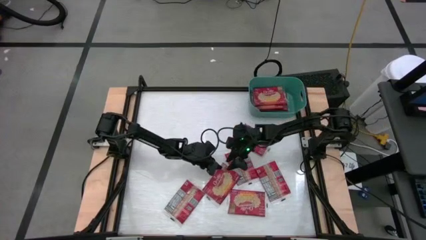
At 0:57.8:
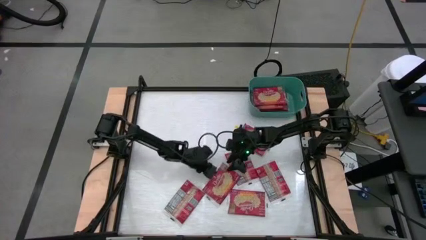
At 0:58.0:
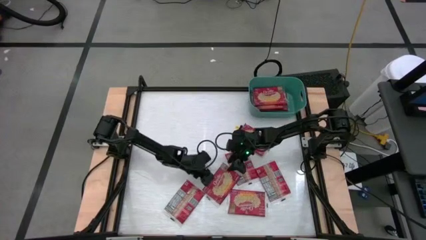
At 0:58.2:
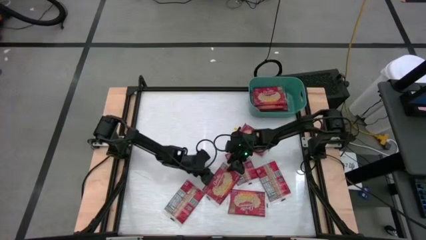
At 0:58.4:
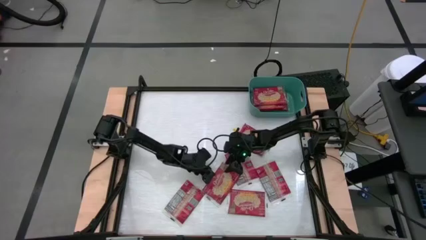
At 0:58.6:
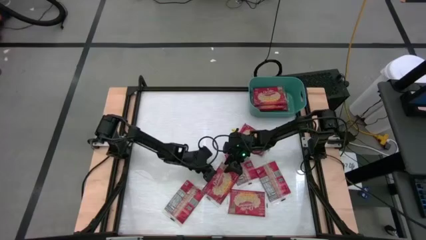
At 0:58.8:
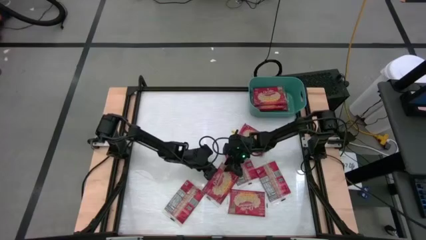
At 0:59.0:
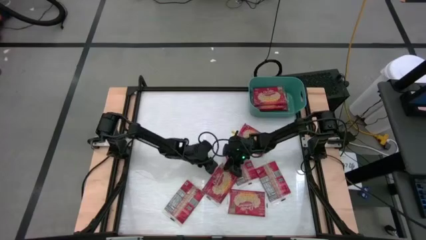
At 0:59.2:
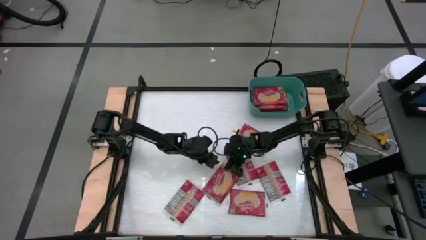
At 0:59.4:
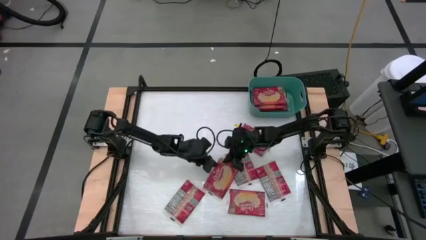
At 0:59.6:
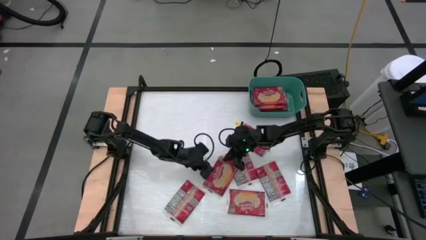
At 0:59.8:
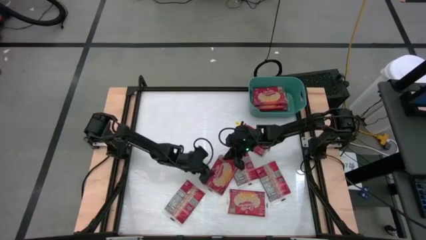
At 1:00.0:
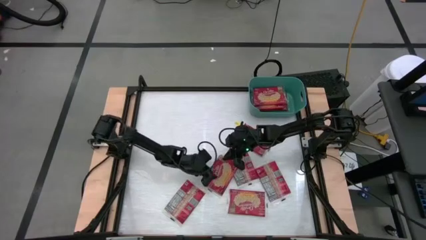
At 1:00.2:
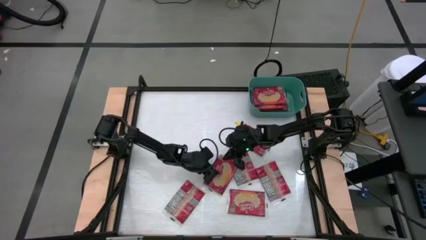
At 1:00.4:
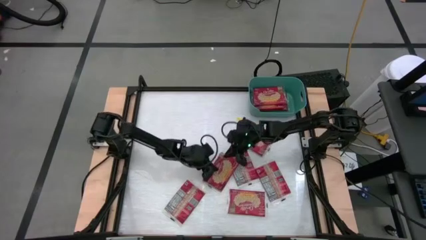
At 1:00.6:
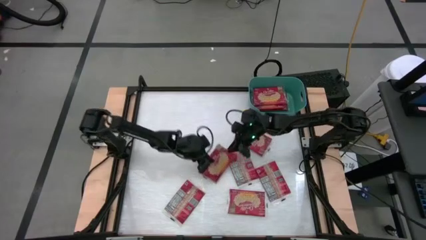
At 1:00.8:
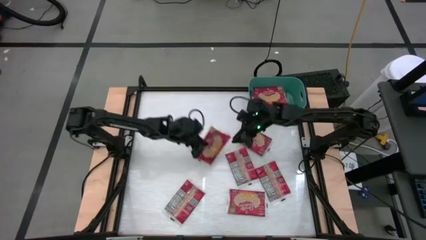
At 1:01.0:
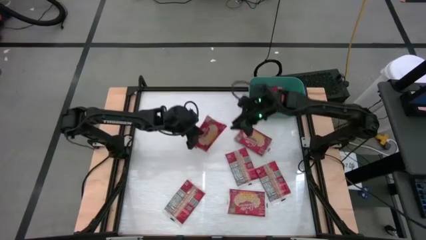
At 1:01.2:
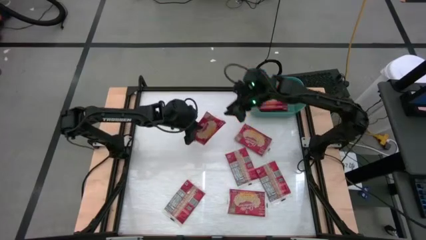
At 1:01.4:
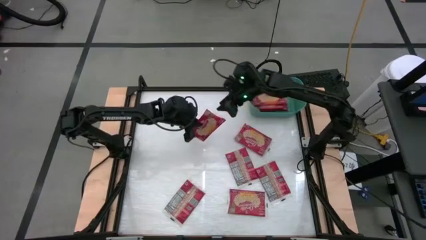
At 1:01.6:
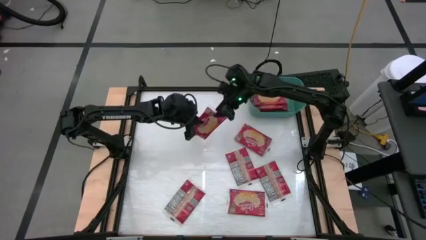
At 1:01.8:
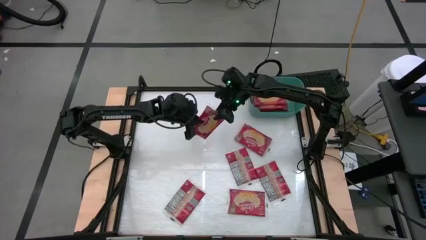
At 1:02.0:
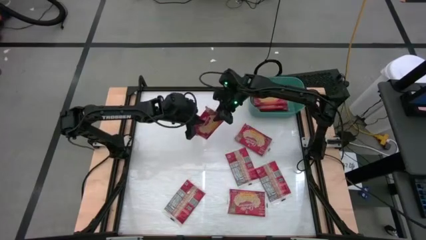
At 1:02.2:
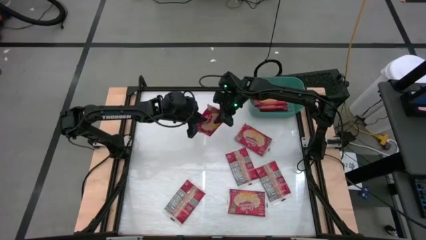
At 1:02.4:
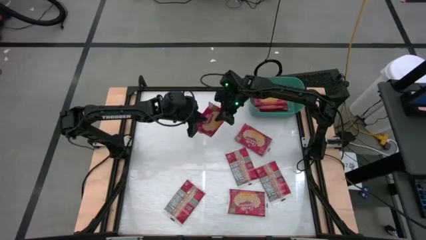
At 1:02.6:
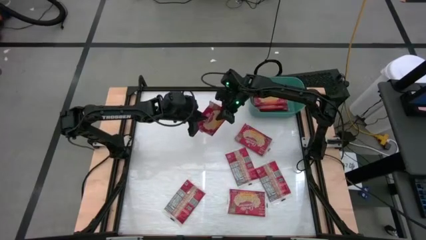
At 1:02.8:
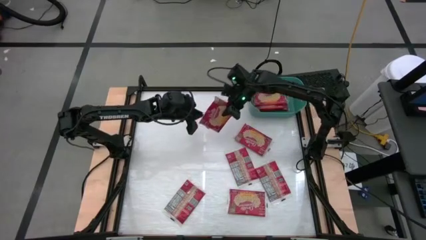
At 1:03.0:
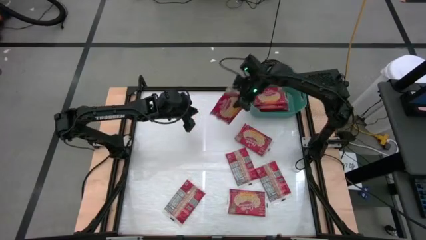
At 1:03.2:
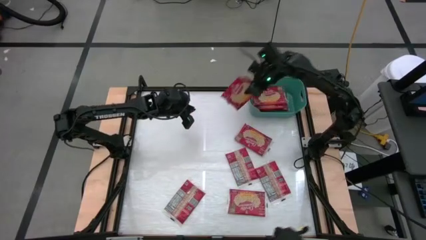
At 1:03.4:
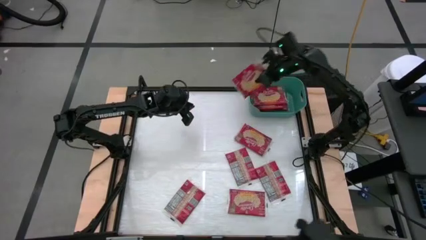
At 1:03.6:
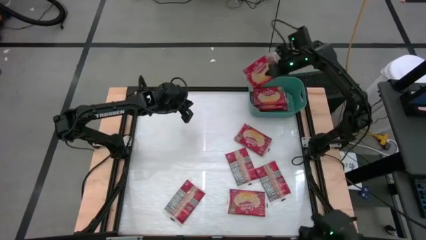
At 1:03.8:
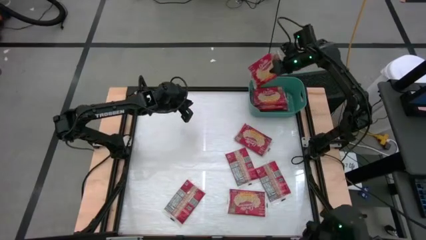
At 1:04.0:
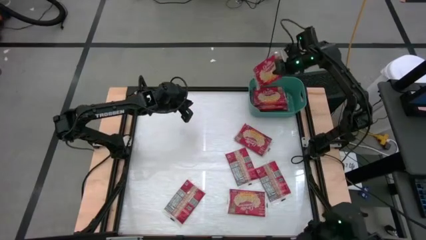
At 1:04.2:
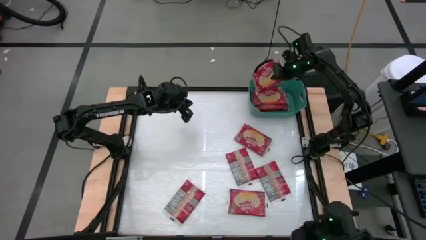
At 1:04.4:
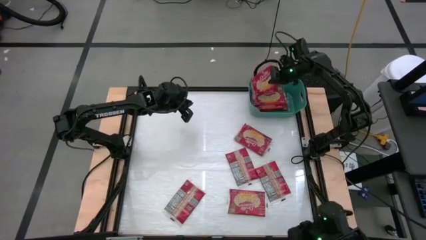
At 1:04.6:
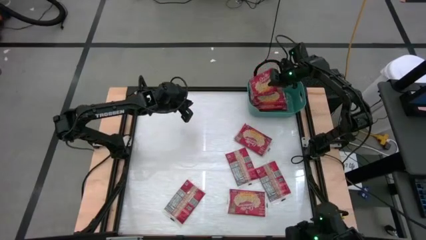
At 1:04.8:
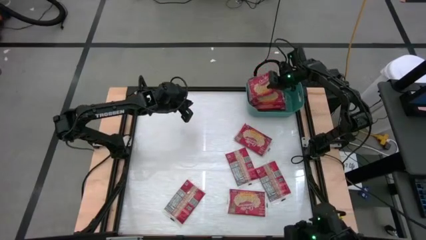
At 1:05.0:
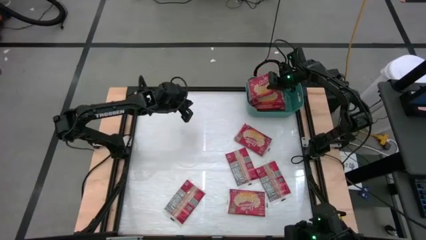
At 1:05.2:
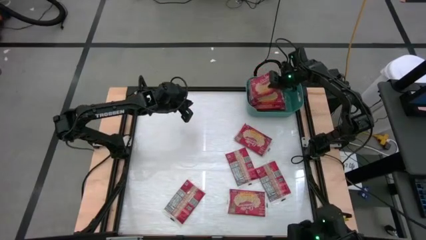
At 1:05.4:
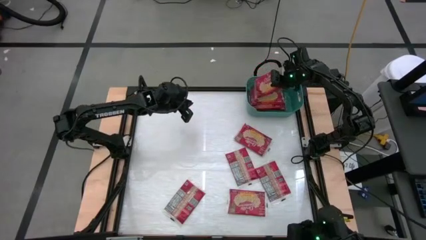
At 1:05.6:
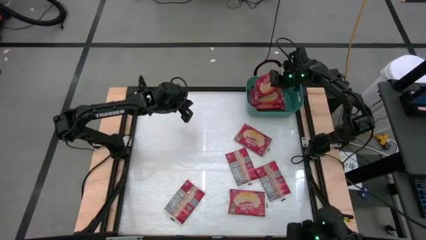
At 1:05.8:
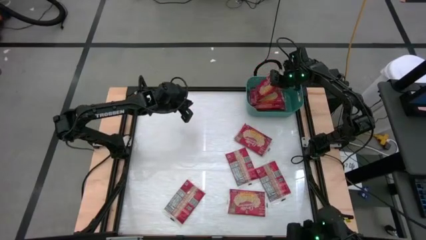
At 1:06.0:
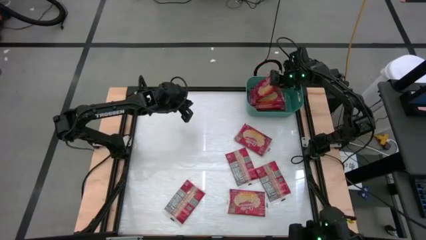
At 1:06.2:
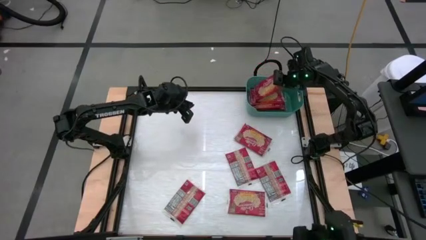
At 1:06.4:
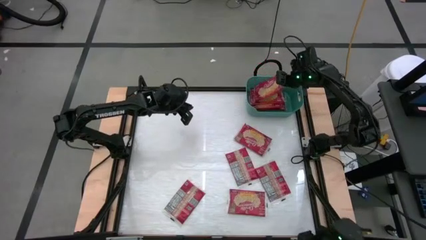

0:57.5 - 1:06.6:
Task: Sort popcorn bags into baskets
Put the red popcorn bag into the green bin

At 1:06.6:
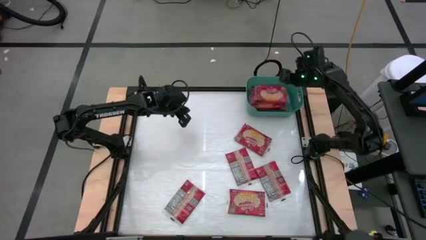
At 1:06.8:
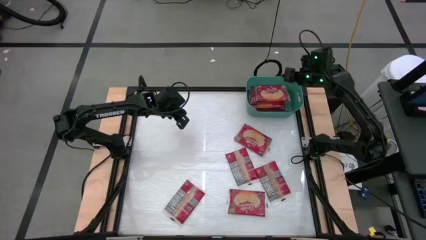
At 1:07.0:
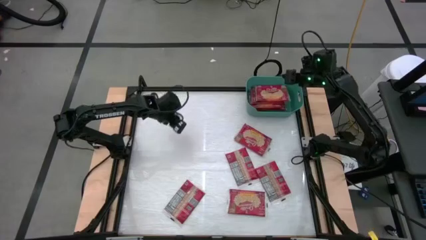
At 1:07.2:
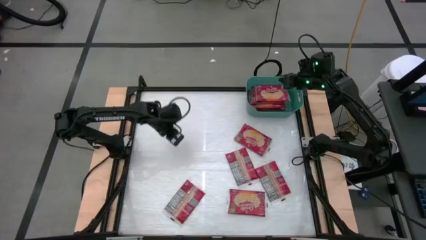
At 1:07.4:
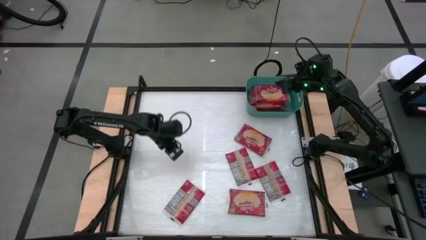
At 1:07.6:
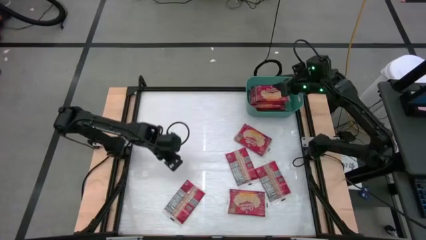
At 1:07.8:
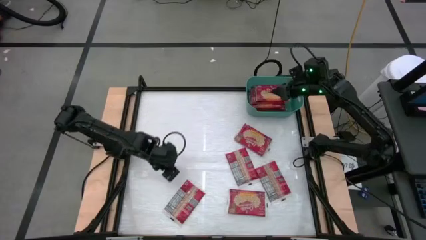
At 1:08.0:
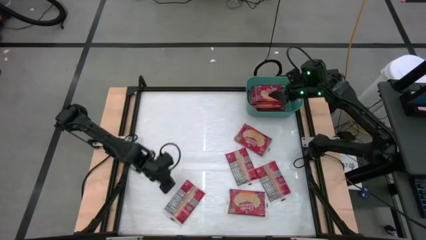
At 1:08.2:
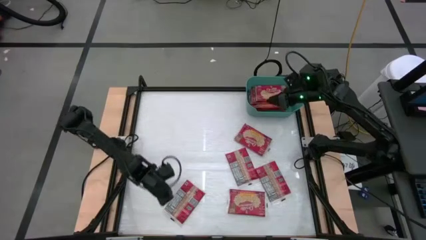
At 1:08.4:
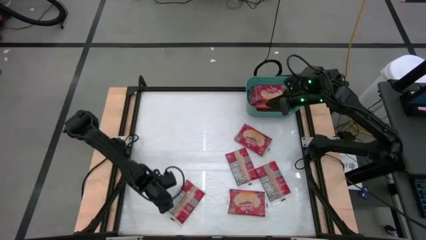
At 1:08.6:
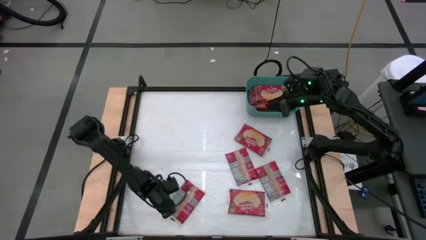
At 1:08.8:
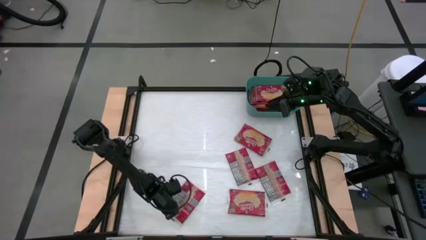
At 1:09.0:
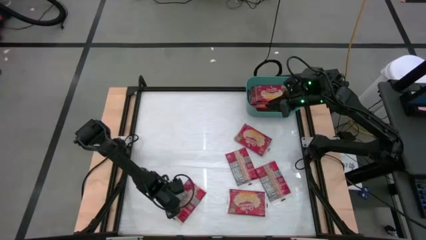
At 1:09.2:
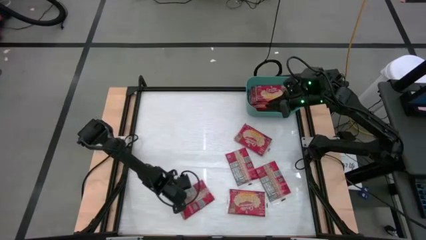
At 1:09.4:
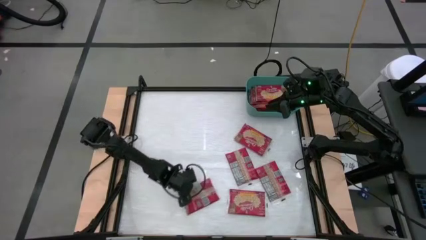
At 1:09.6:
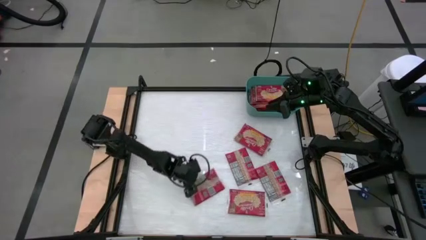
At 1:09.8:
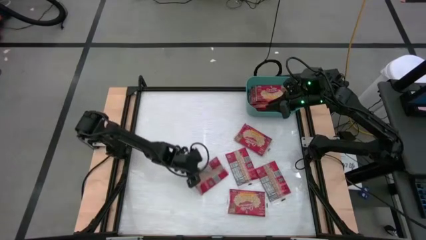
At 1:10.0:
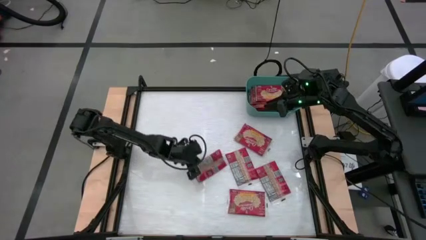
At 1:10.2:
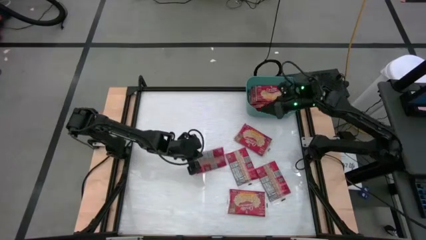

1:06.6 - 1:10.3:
Put the red popcorn bag into the green bin
